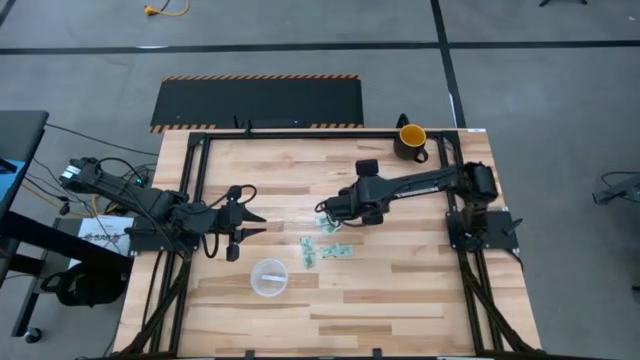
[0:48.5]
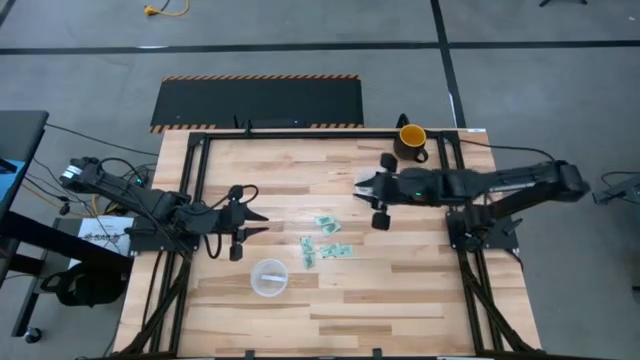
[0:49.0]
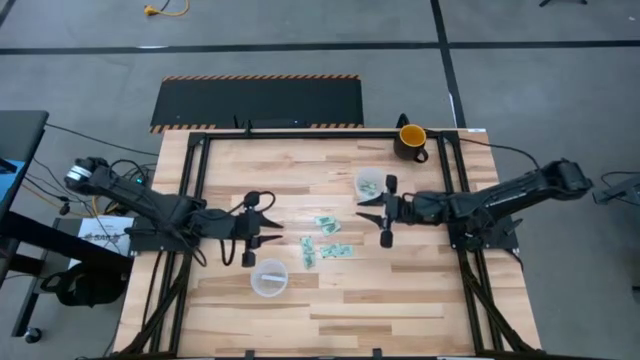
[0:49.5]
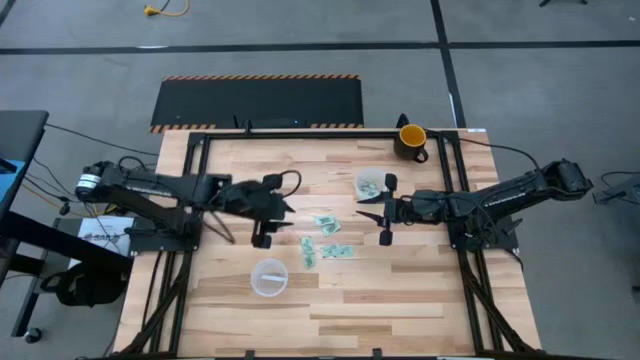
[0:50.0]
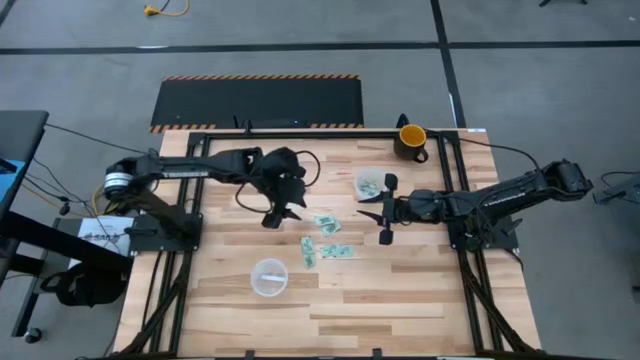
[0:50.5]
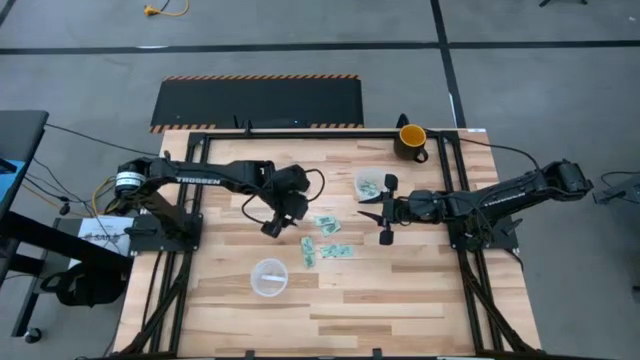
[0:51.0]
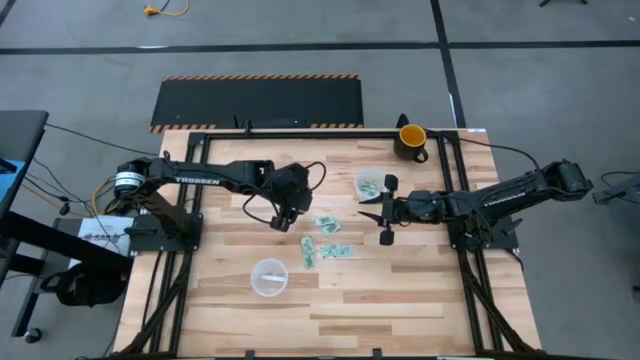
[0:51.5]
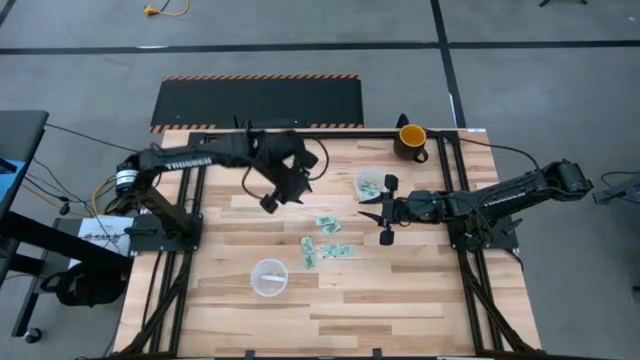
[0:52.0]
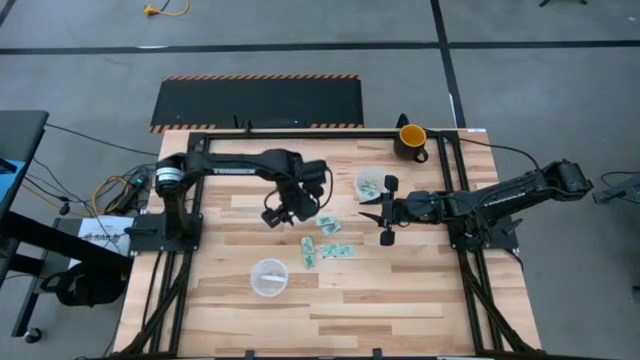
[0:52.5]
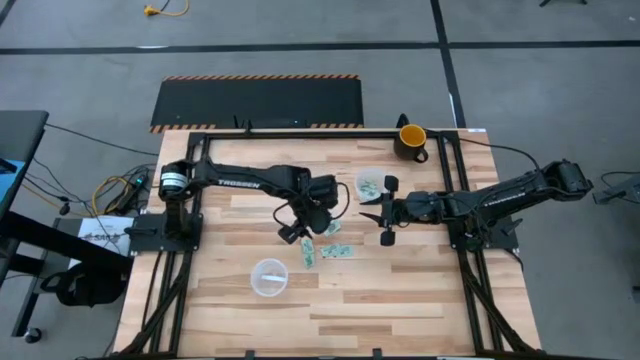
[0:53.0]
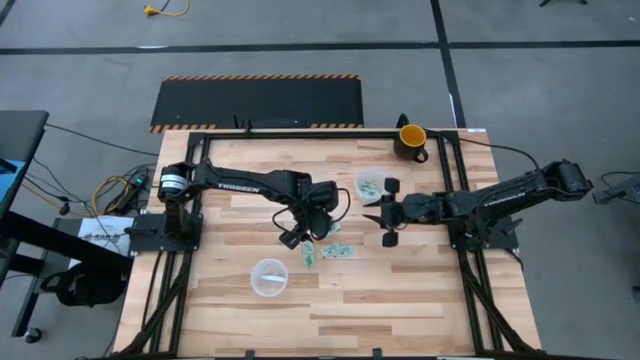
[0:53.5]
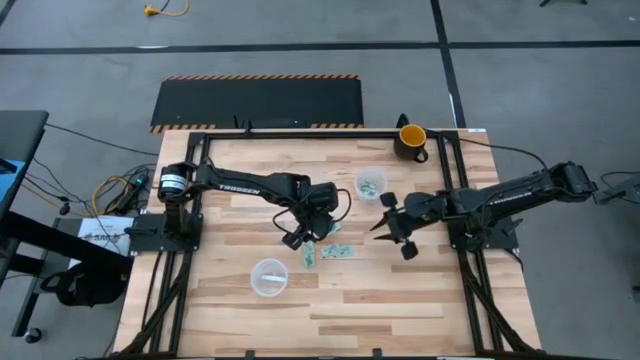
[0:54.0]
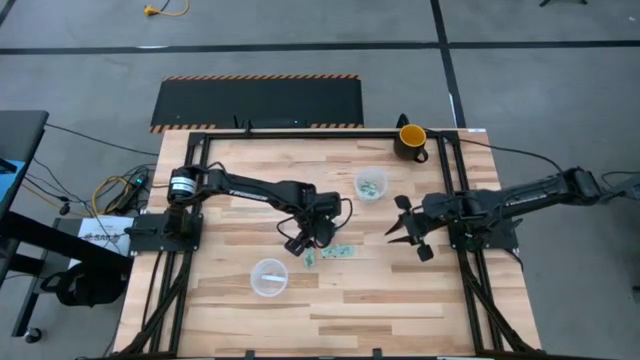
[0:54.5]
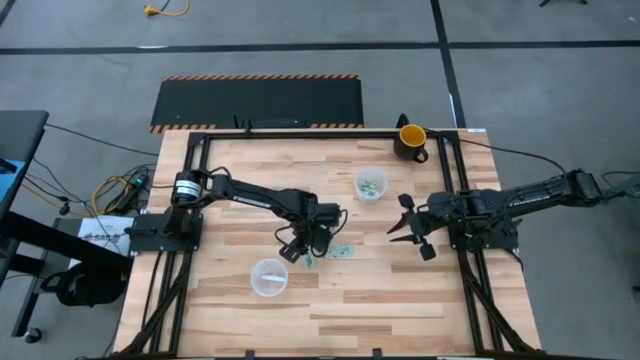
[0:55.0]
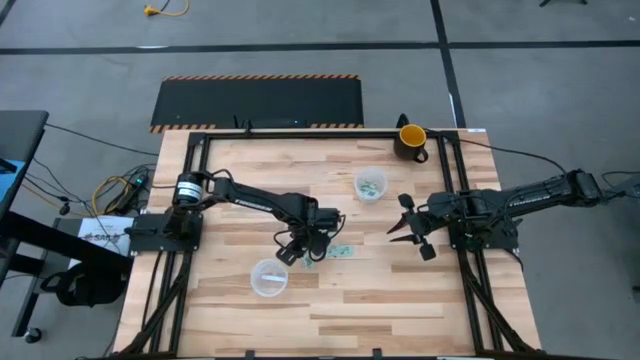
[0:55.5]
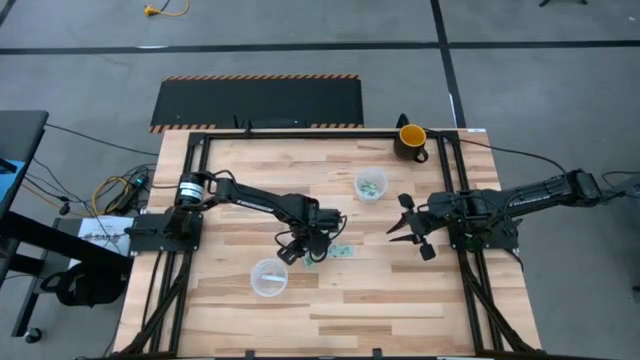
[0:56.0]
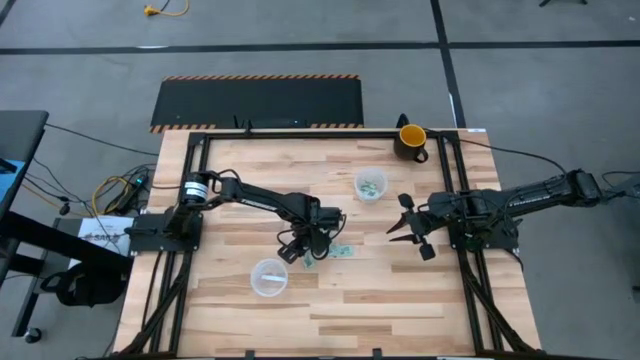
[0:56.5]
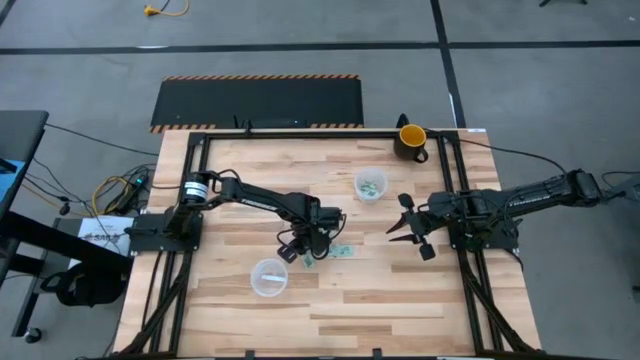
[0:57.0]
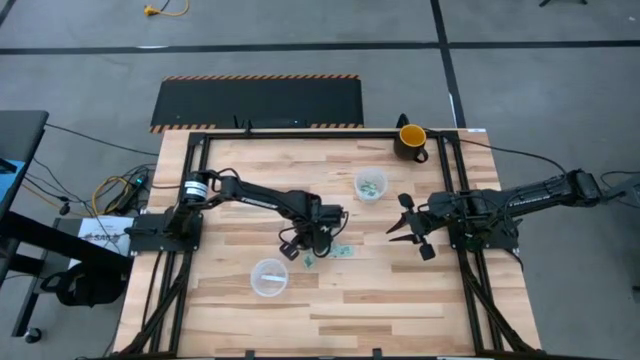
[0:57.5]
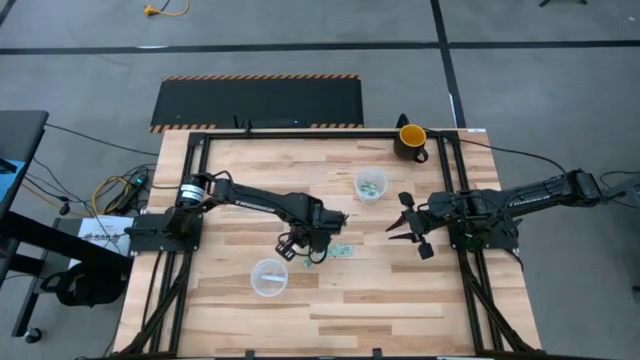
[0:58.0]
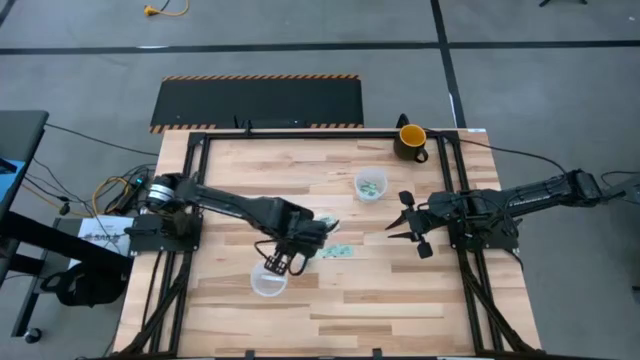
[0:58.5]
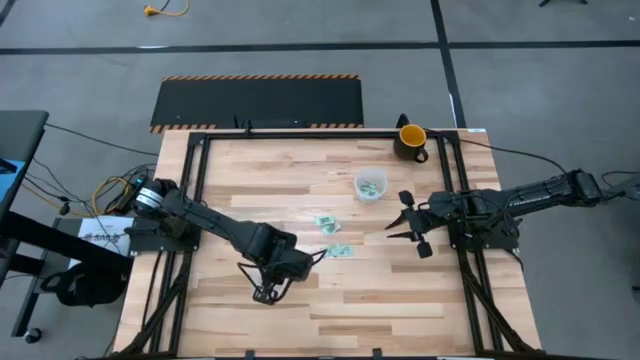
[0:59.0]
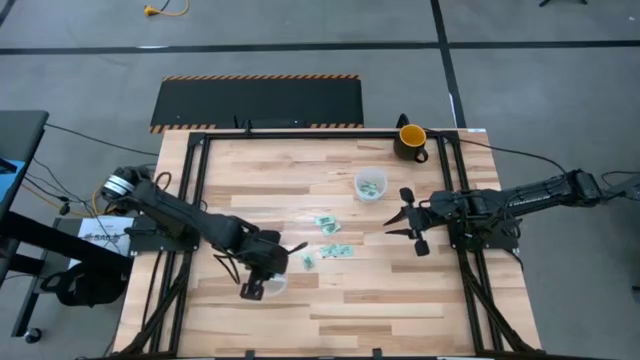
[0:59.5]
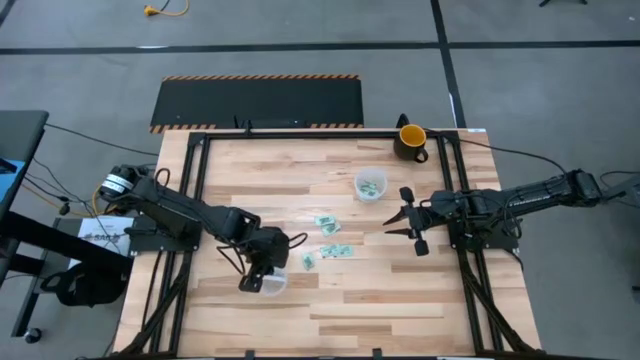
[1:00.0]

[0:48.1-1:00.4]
Task: Pick and place Stevia / Truvia into bins
Put the stevia packet into the bottom transparent container

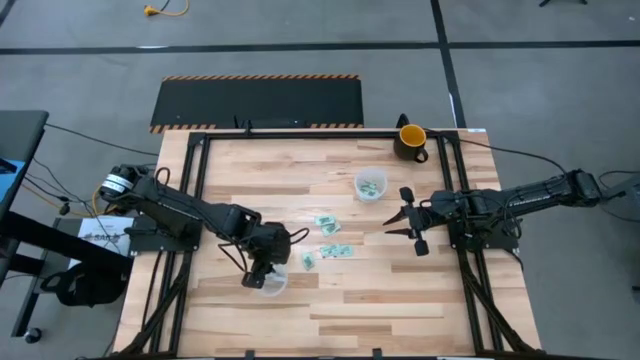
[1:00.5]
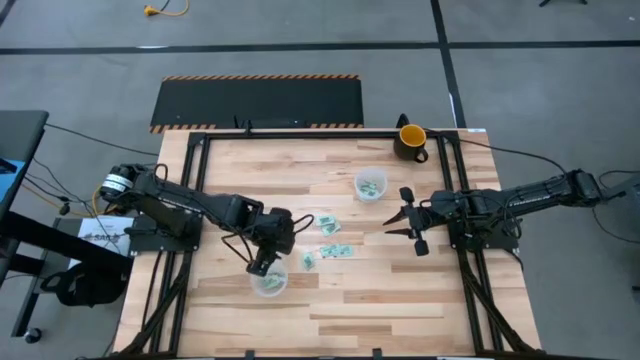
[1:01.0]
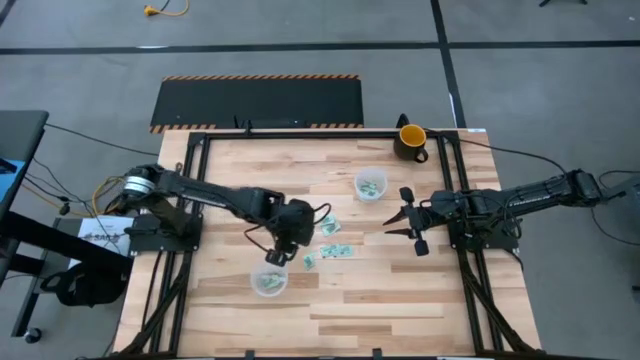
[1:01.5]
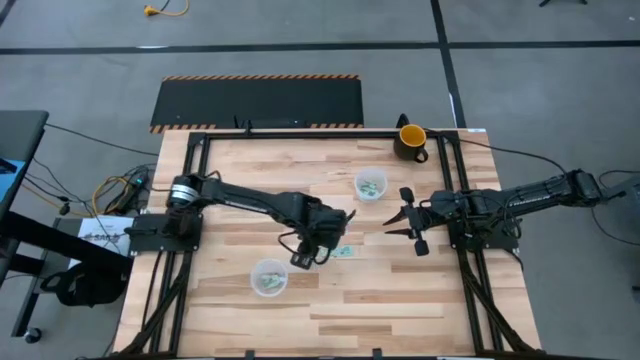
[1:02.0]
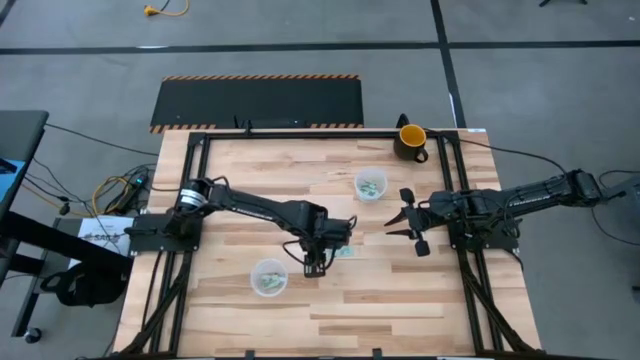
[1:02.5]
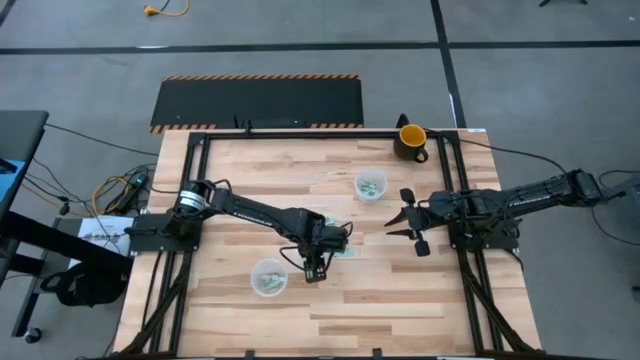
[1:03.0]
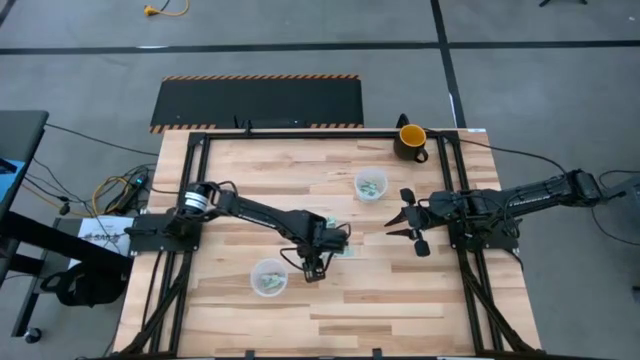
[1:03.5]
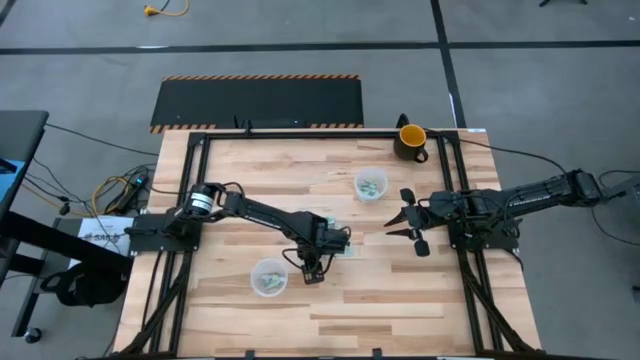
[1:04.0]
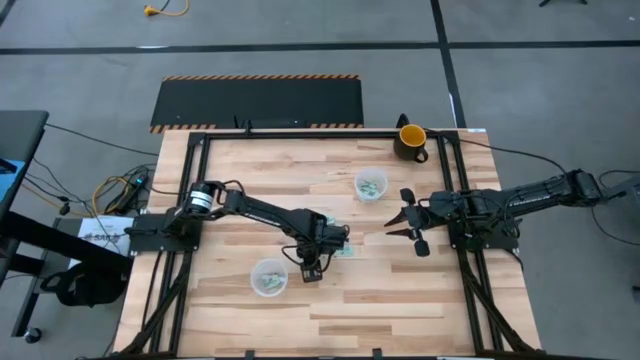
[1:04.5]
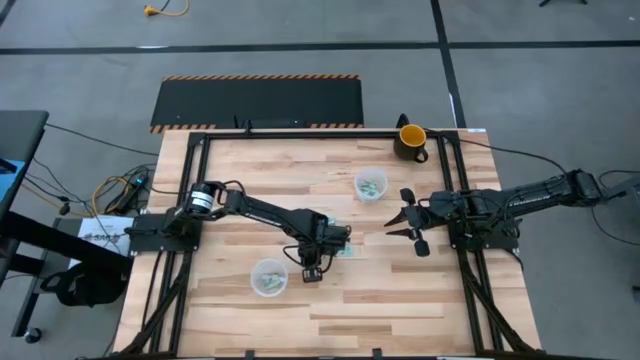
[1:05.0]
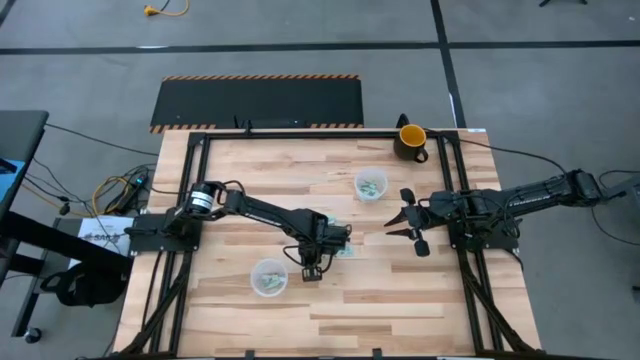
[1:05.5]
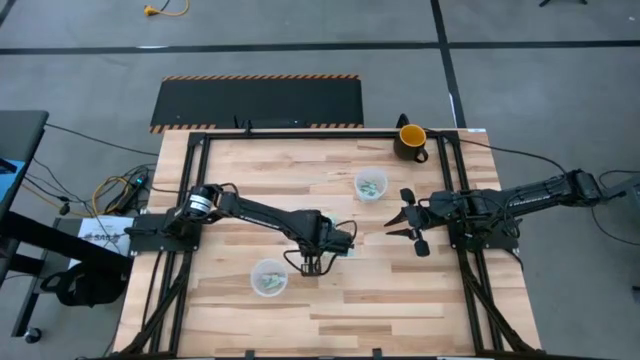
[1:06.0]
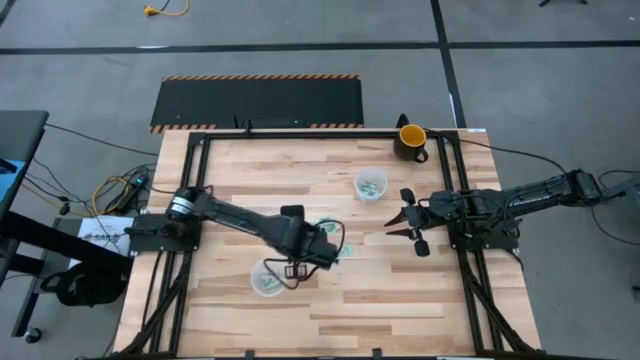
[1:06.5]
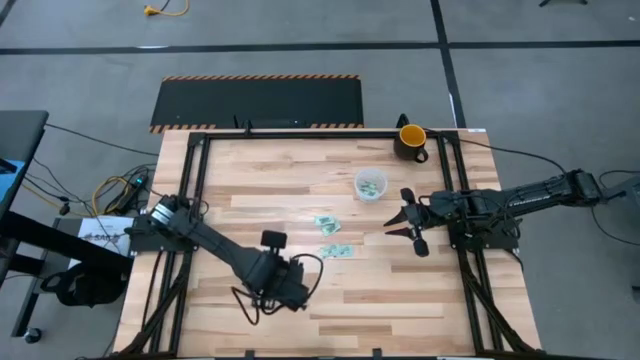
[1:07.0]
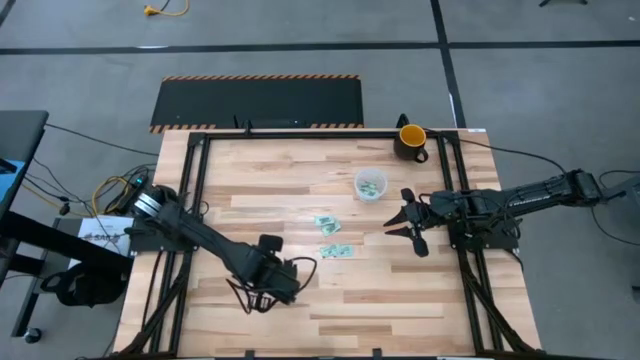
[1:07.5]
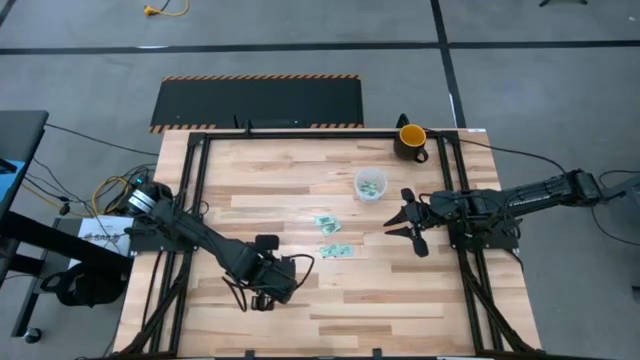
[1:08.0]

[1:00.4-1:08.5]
Put the stevia packet into the bottom transparent container
